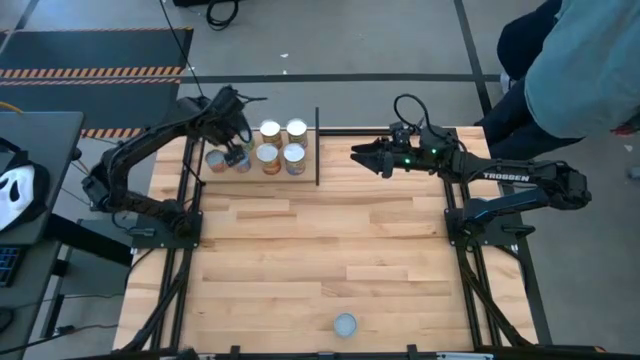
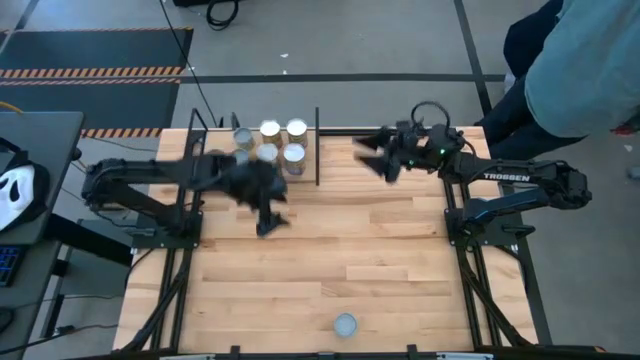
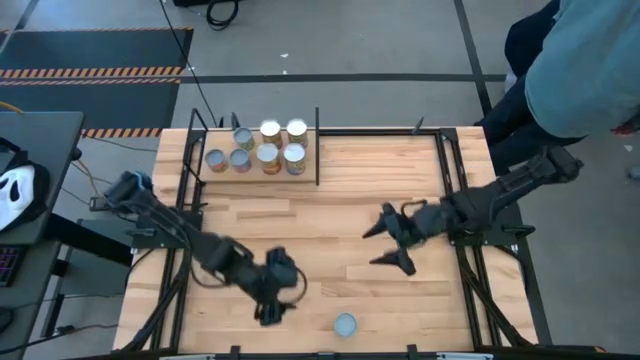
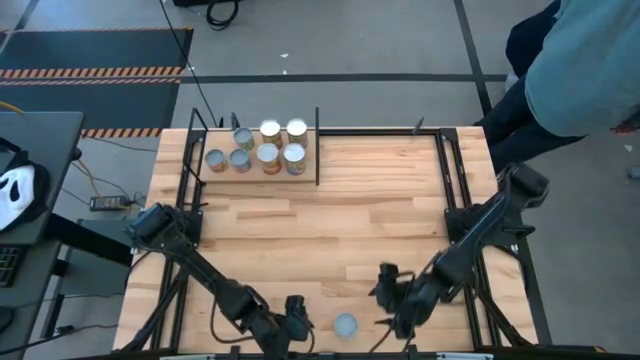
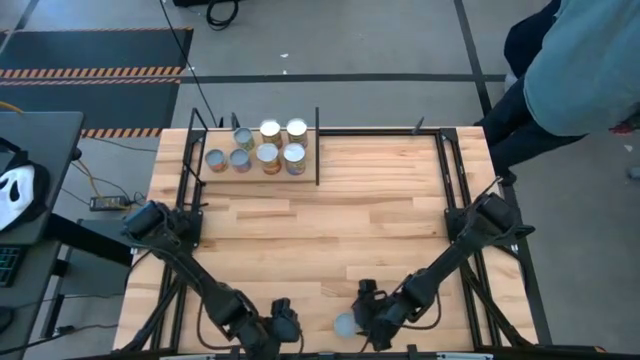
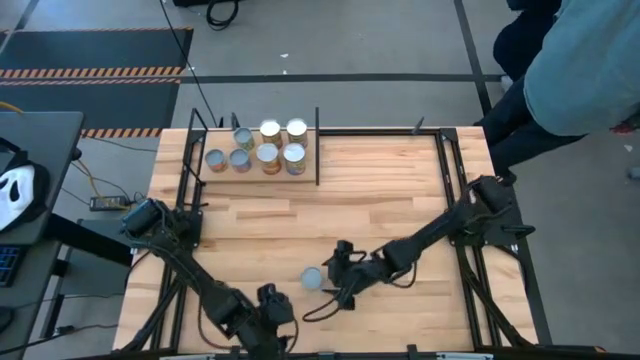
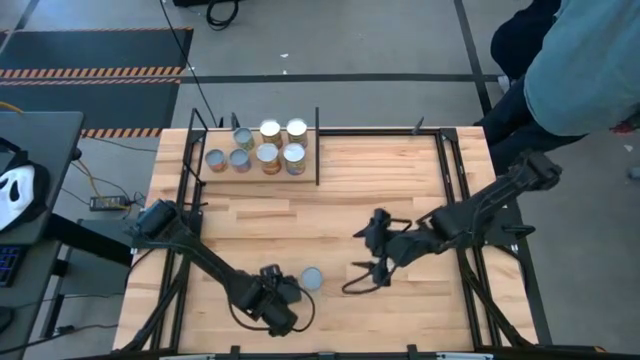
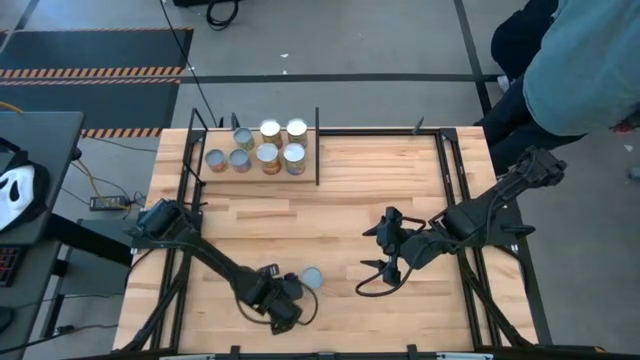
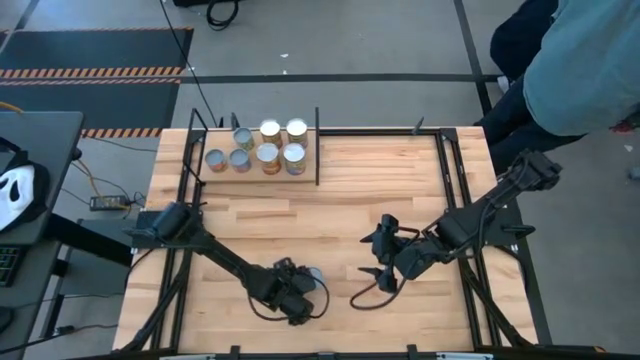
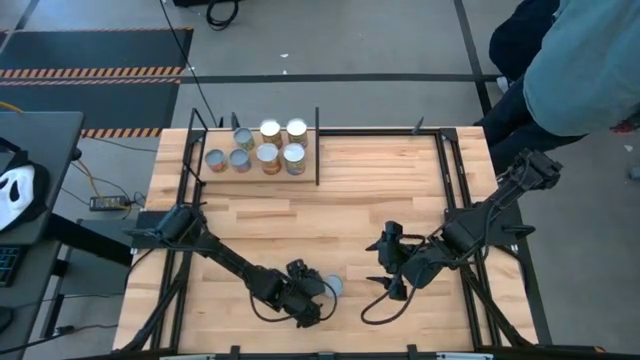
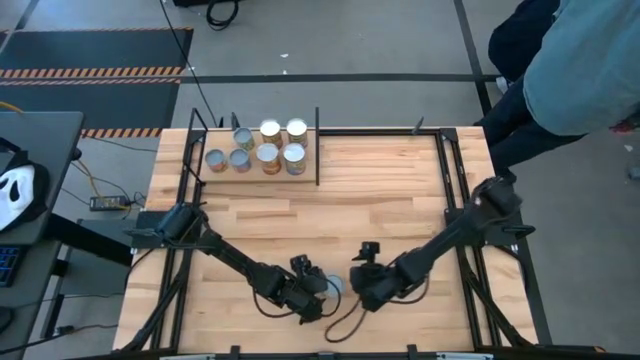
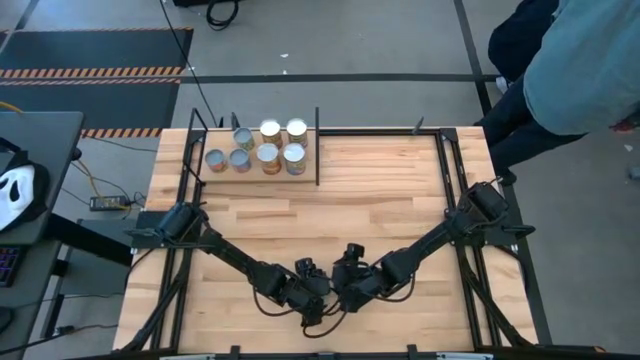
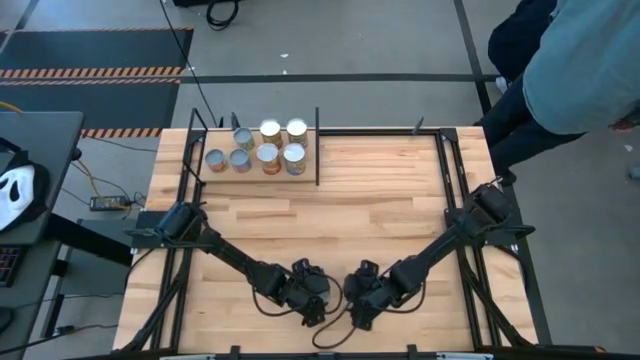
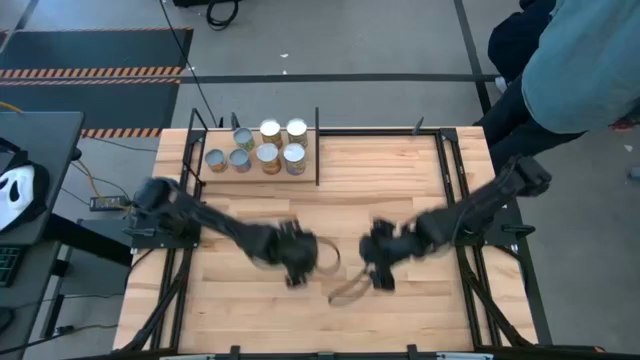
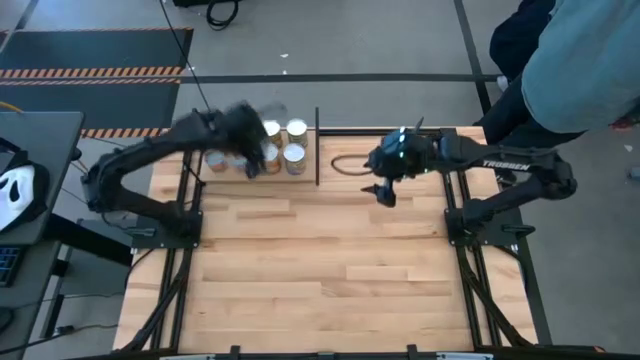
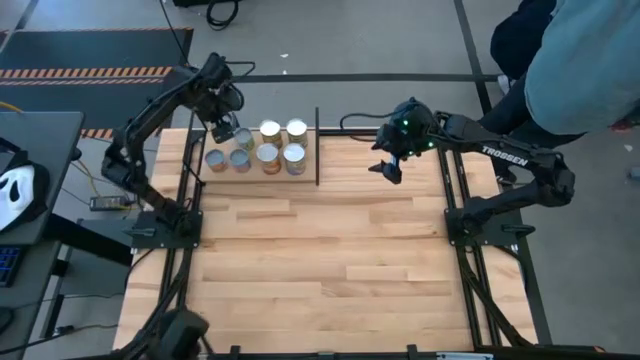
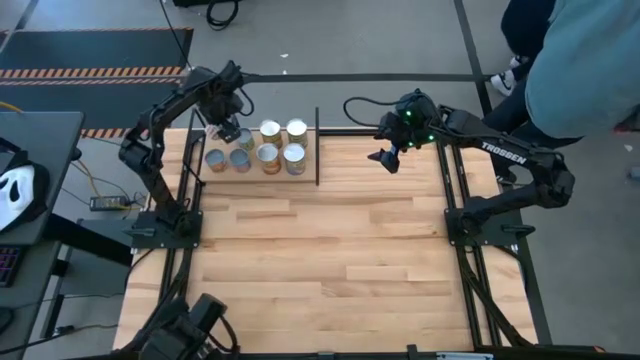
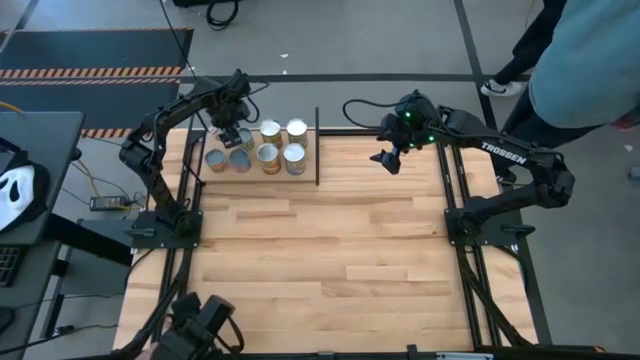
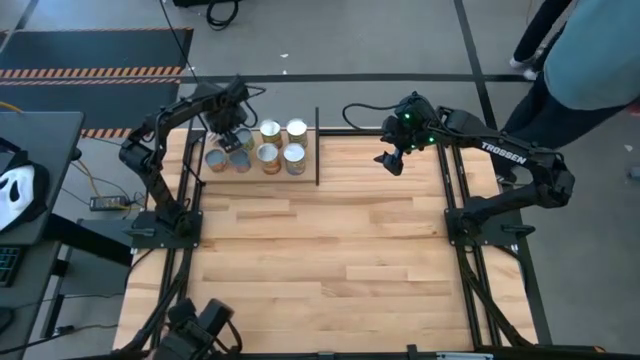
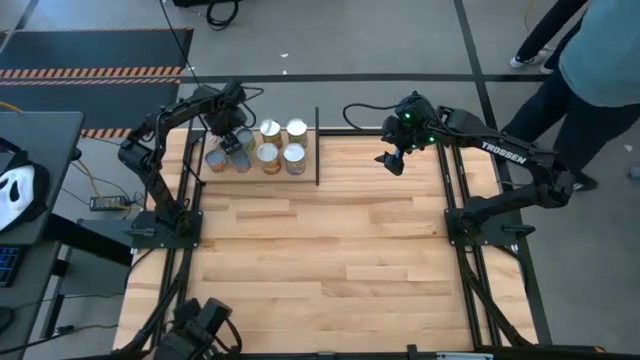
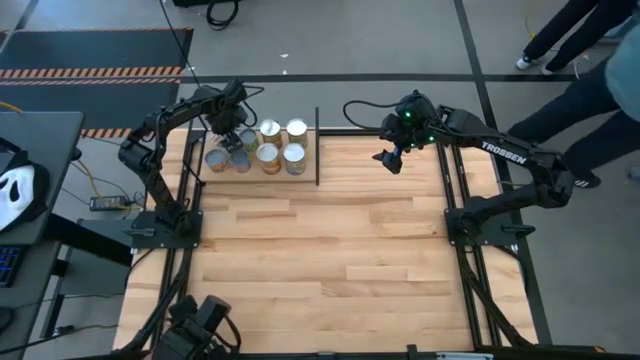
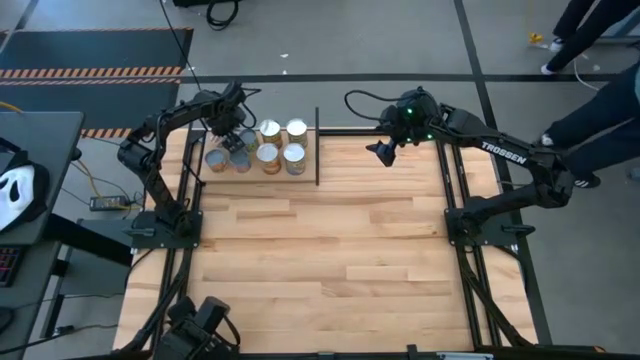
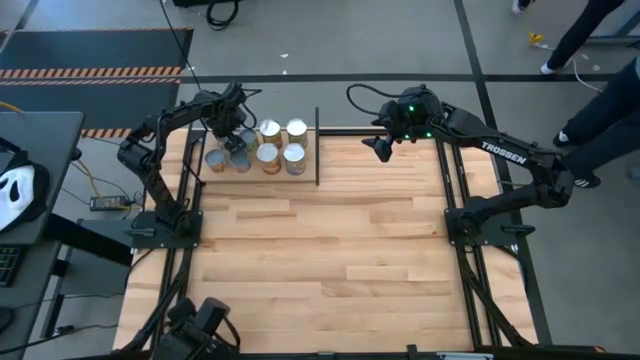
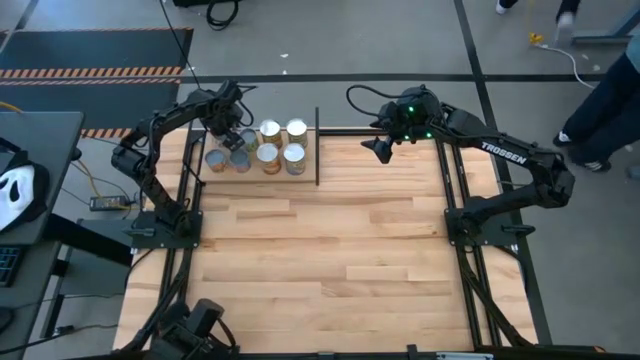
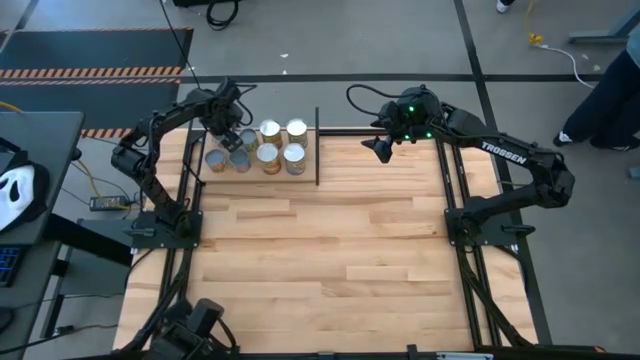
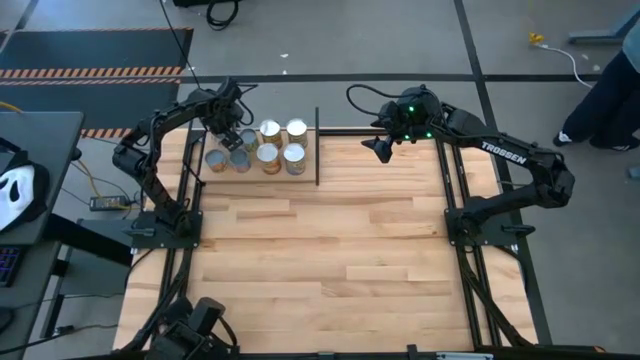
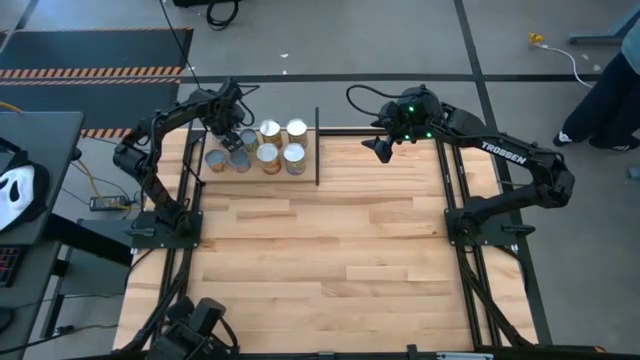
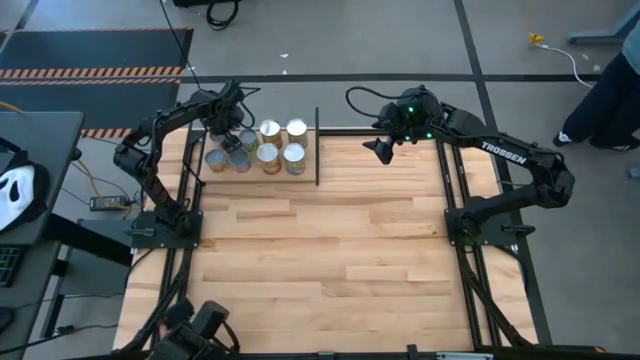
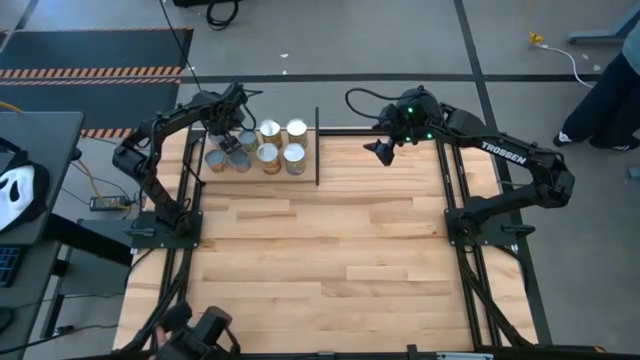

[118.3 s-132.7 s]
Task: Pick and place cans onto a shelf
Put the canned sliced carrots on the shelf

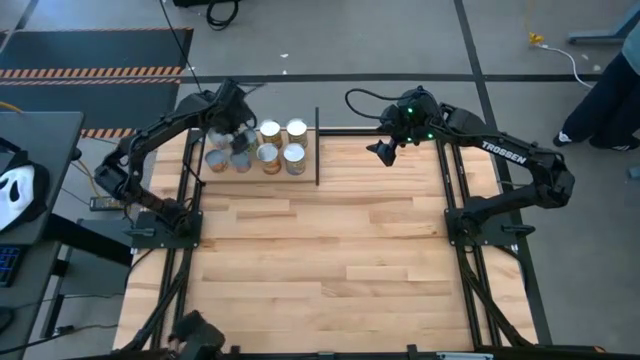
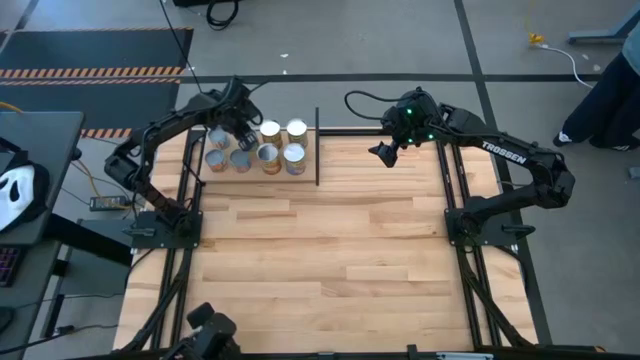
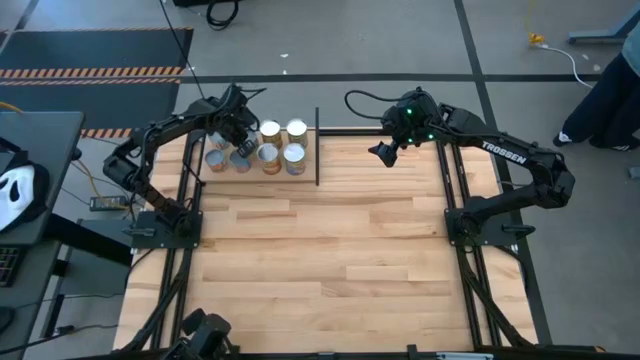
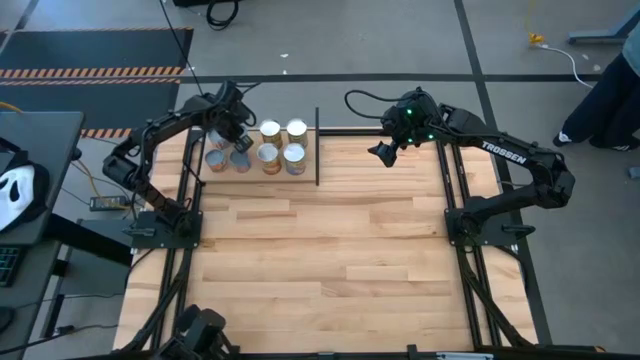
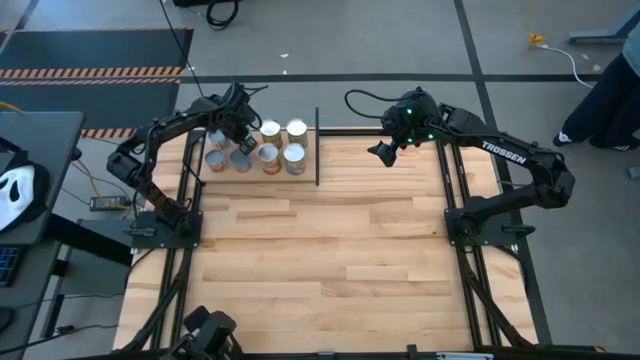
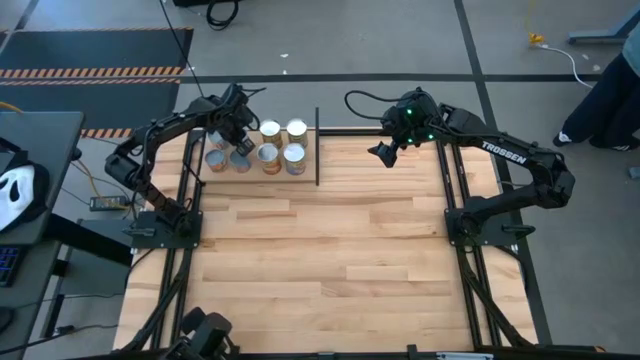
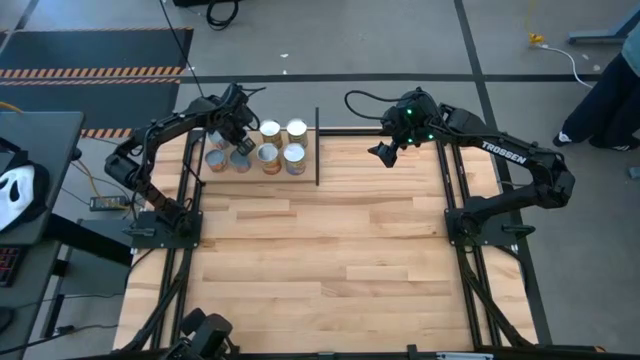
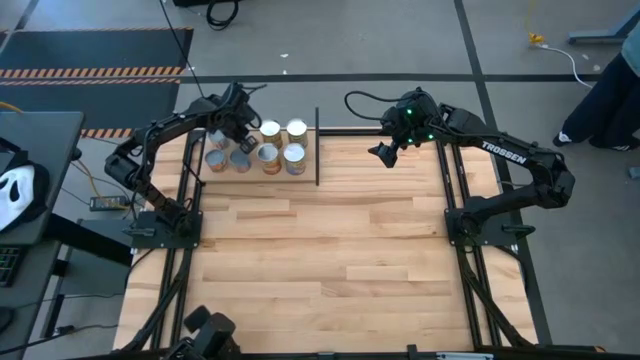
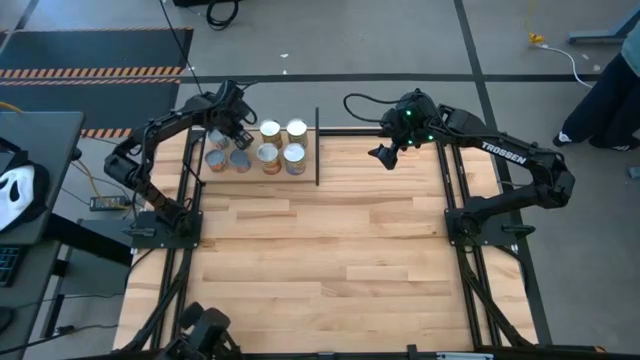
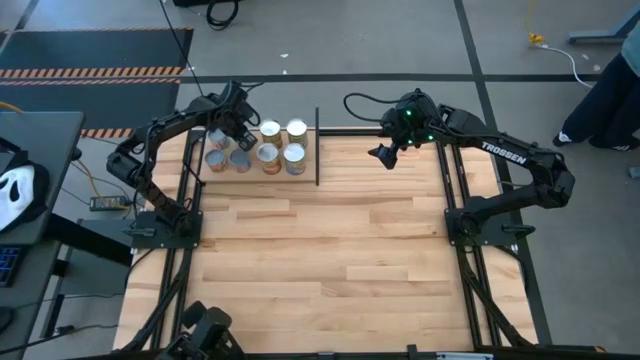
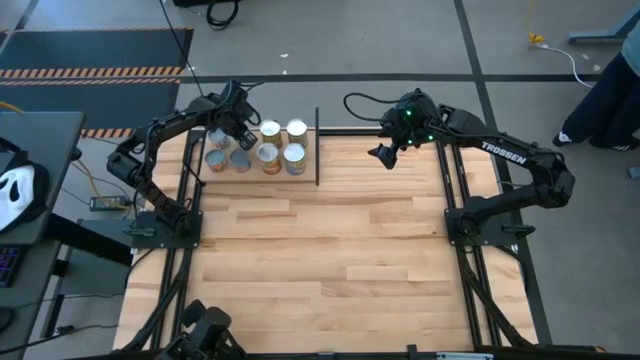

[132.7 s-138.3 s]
Adjust the canned green peas on the shelf
